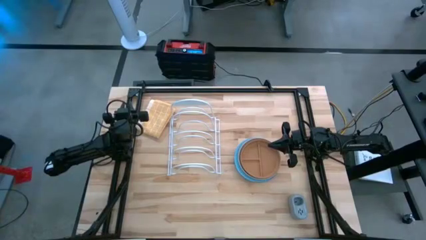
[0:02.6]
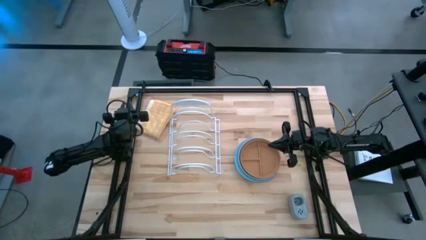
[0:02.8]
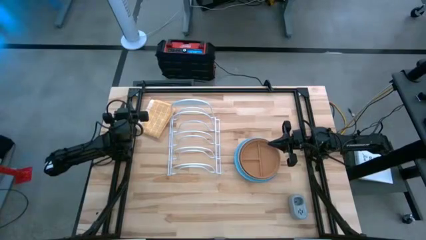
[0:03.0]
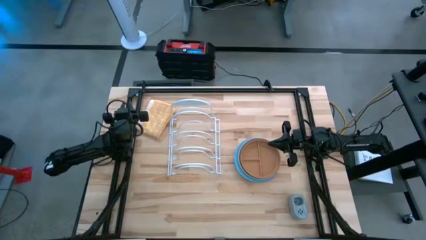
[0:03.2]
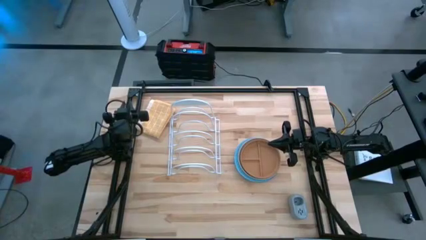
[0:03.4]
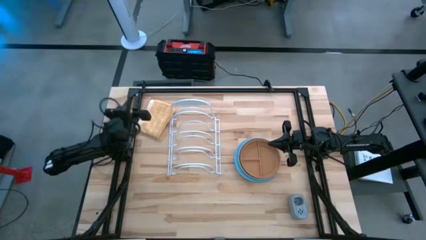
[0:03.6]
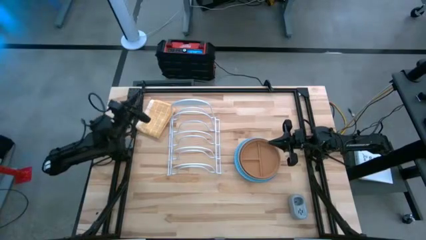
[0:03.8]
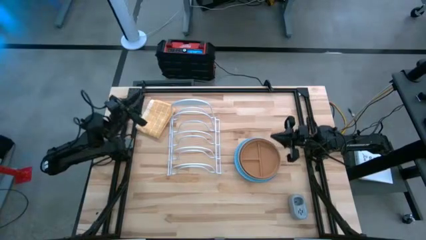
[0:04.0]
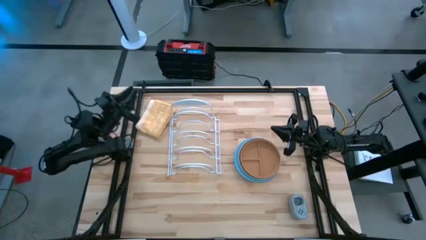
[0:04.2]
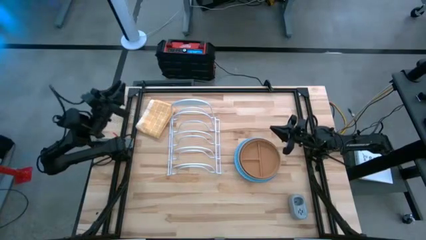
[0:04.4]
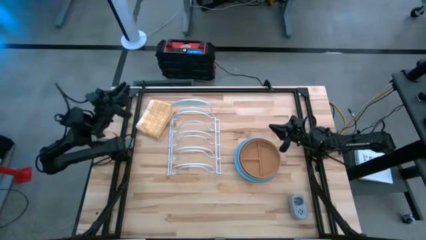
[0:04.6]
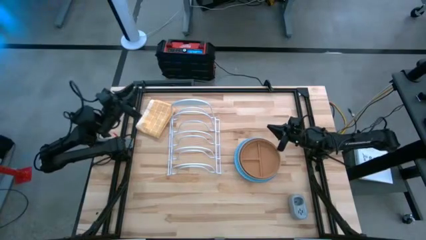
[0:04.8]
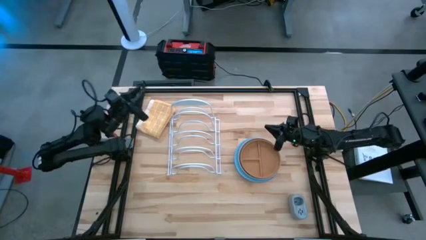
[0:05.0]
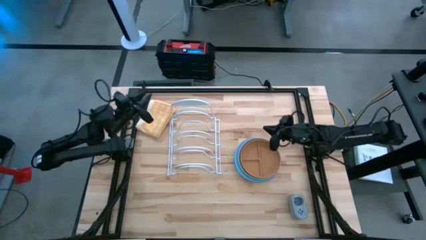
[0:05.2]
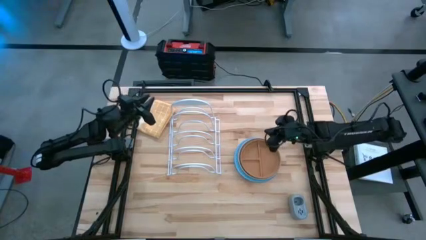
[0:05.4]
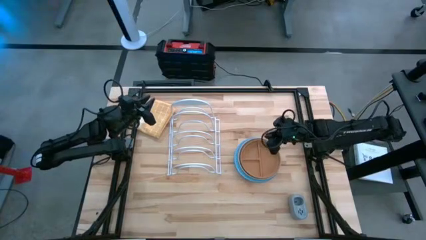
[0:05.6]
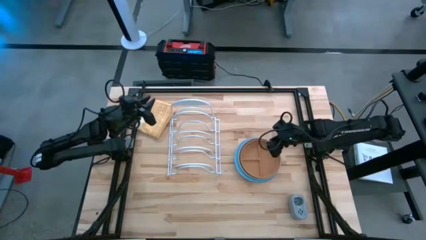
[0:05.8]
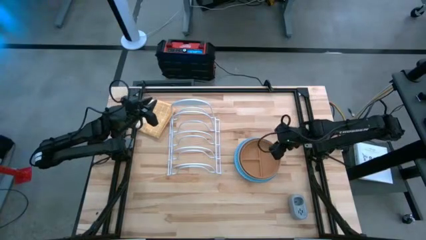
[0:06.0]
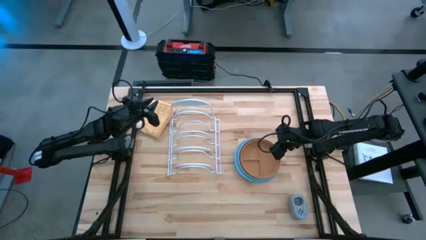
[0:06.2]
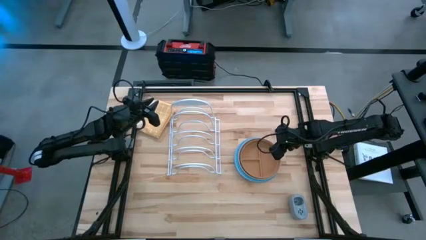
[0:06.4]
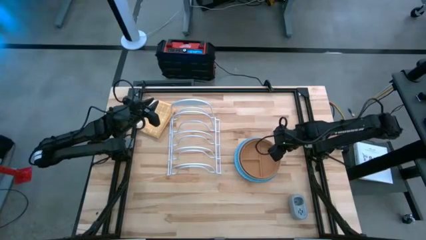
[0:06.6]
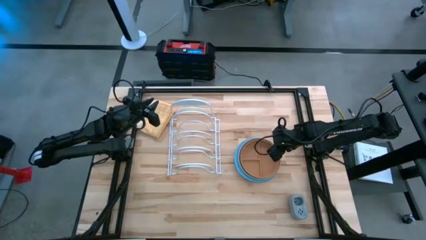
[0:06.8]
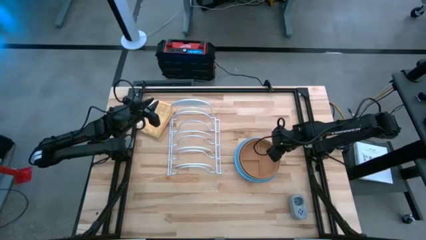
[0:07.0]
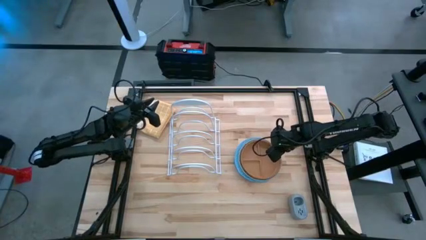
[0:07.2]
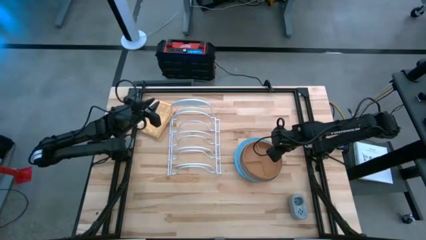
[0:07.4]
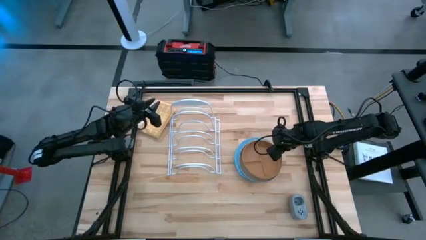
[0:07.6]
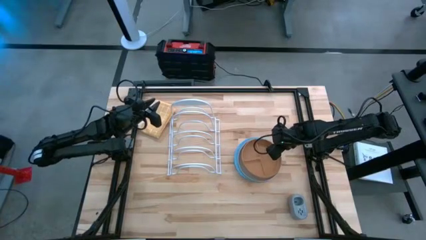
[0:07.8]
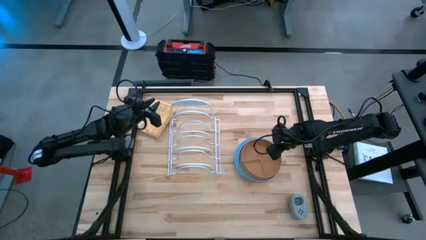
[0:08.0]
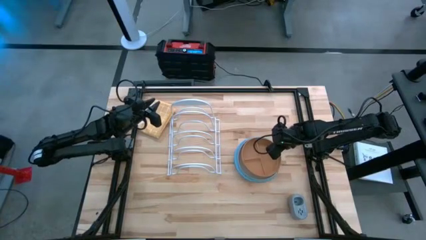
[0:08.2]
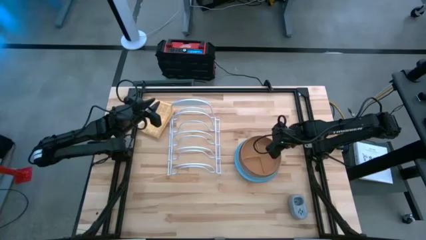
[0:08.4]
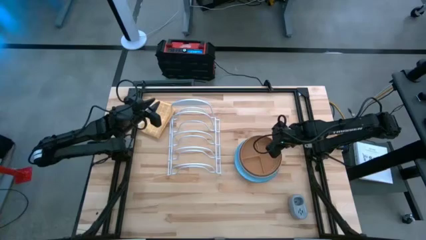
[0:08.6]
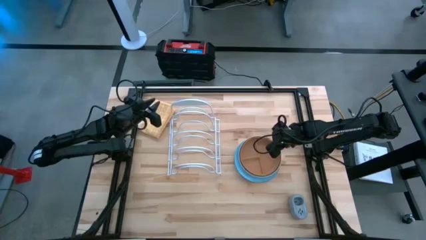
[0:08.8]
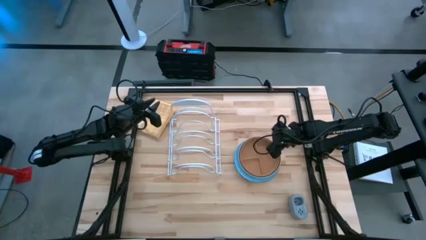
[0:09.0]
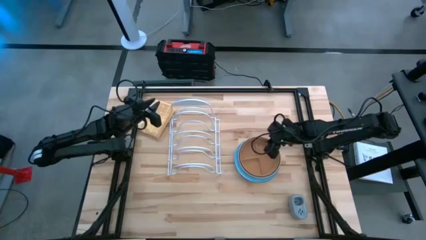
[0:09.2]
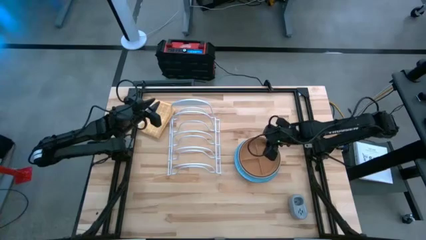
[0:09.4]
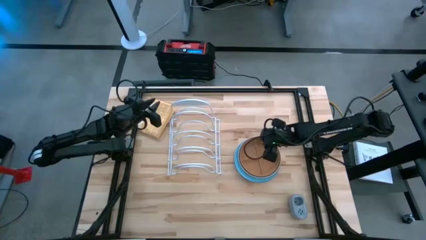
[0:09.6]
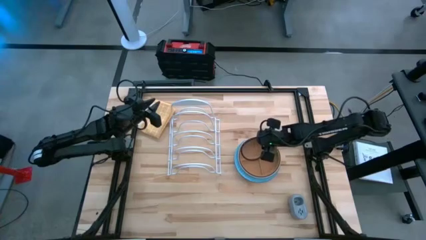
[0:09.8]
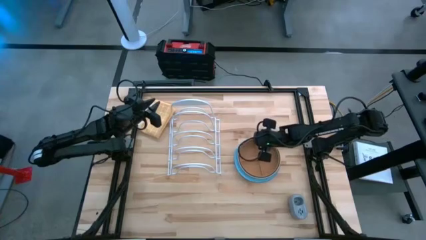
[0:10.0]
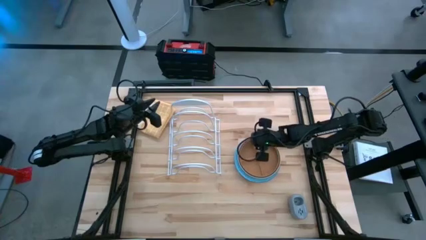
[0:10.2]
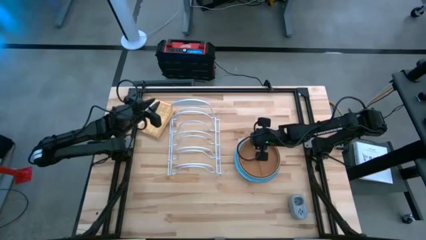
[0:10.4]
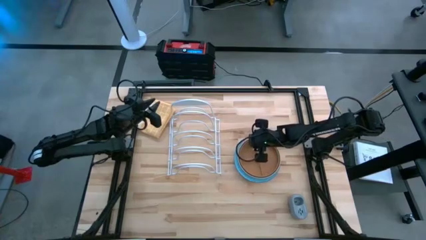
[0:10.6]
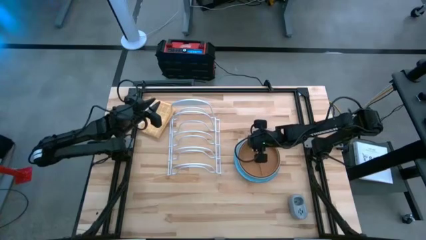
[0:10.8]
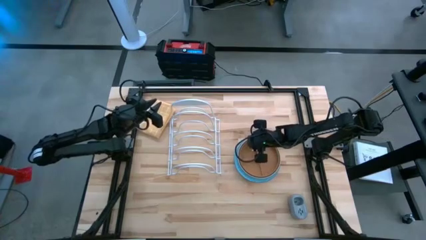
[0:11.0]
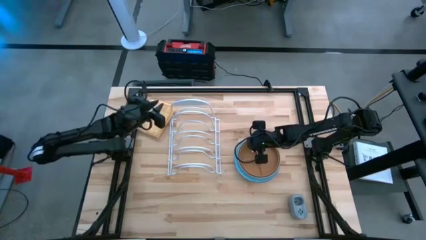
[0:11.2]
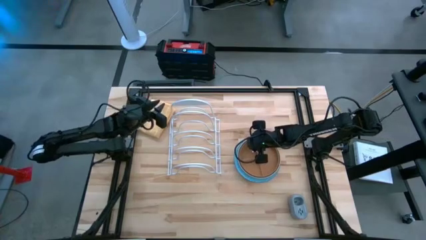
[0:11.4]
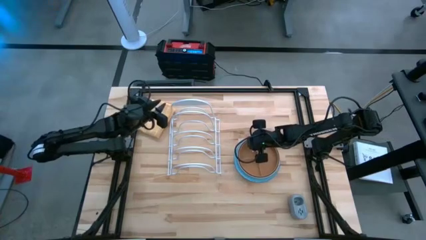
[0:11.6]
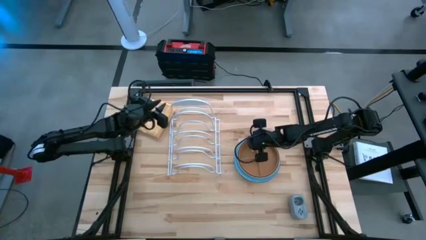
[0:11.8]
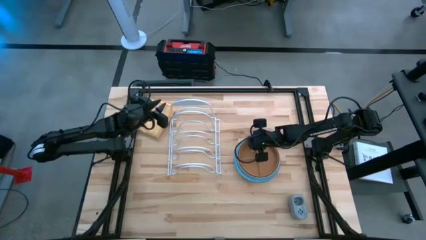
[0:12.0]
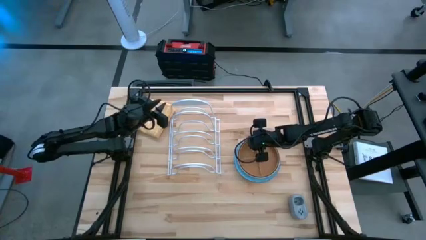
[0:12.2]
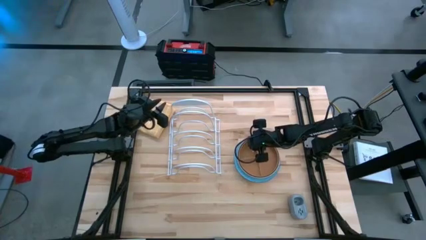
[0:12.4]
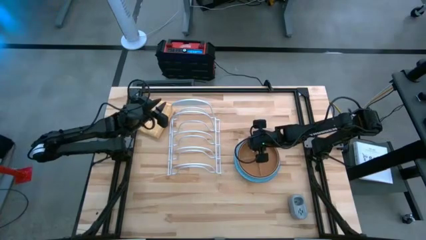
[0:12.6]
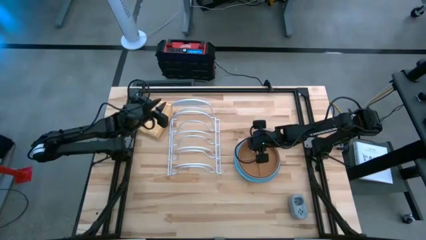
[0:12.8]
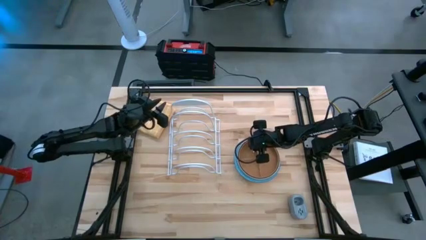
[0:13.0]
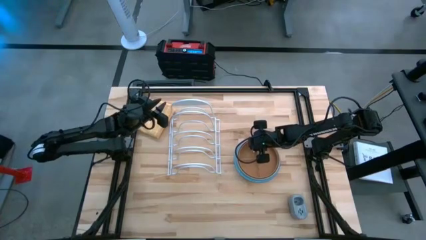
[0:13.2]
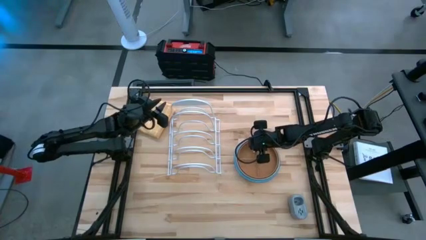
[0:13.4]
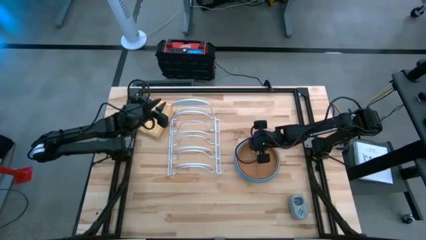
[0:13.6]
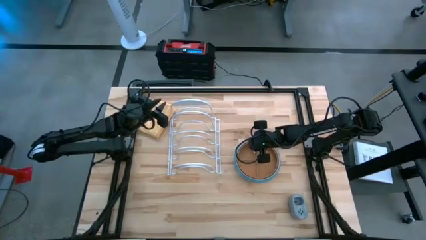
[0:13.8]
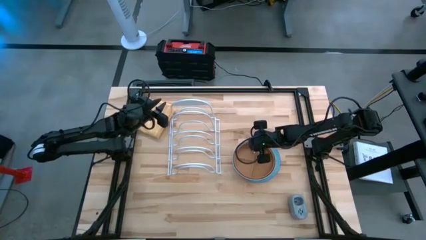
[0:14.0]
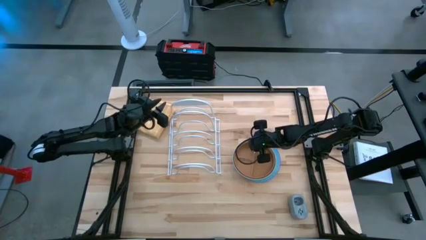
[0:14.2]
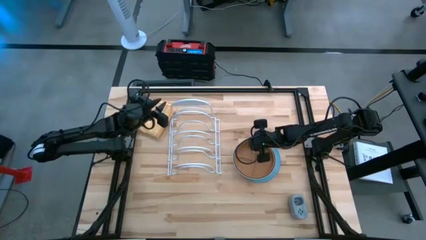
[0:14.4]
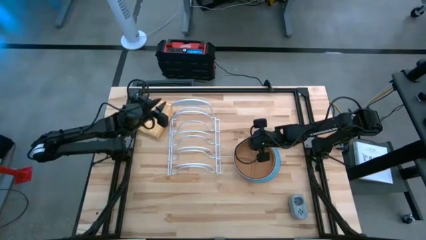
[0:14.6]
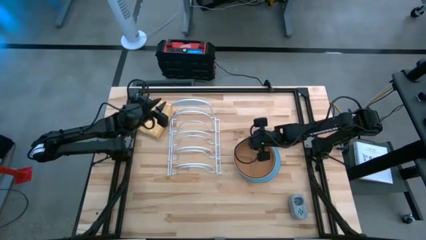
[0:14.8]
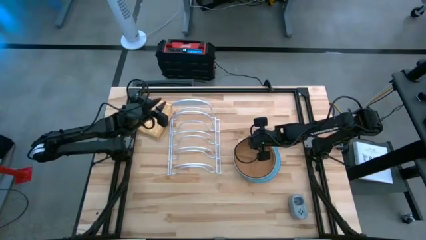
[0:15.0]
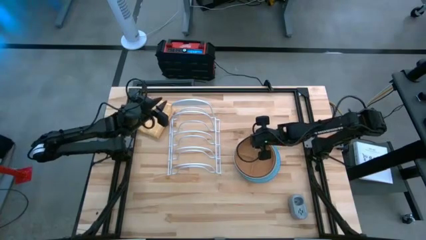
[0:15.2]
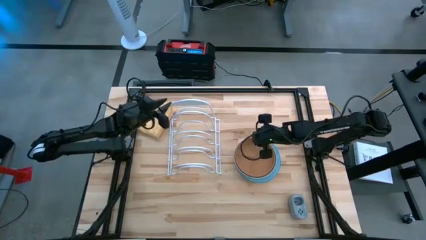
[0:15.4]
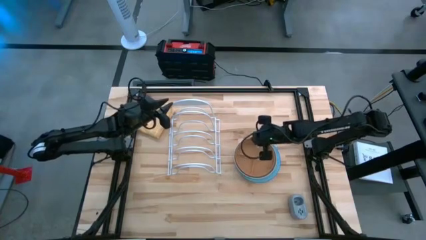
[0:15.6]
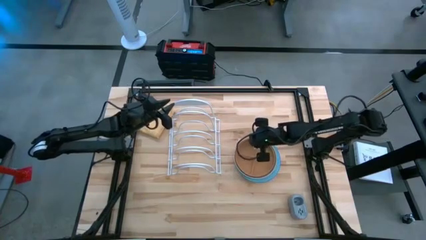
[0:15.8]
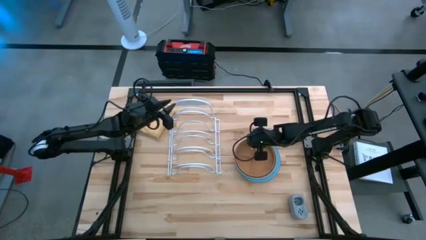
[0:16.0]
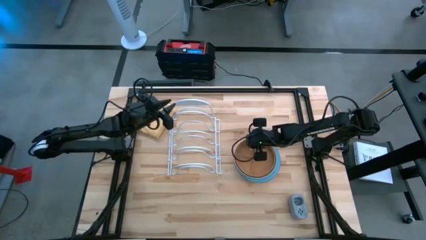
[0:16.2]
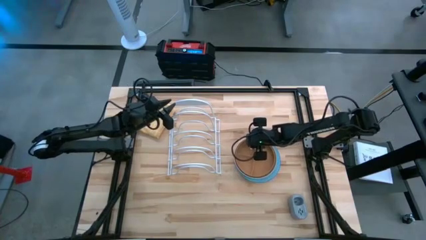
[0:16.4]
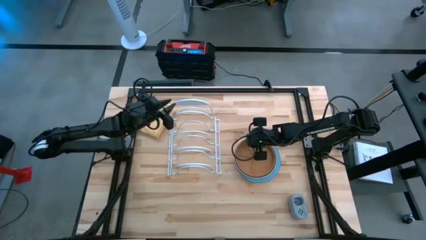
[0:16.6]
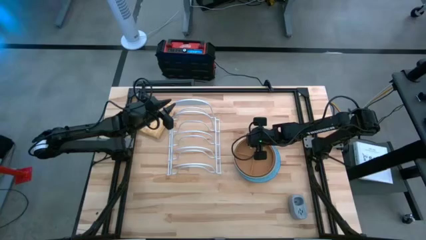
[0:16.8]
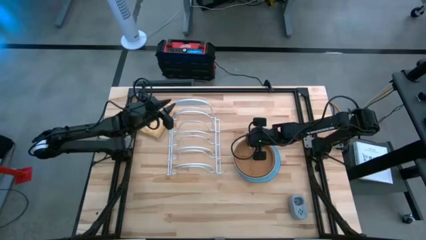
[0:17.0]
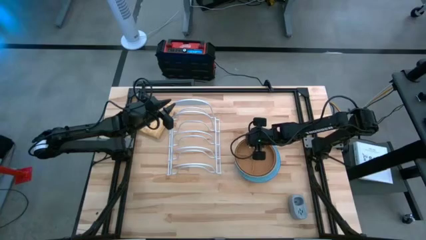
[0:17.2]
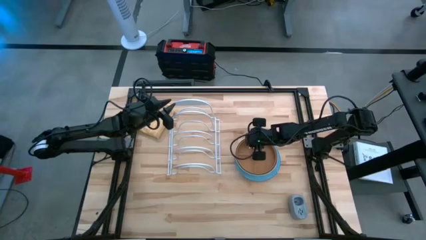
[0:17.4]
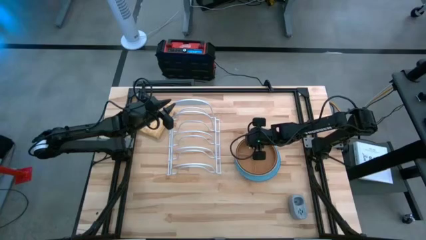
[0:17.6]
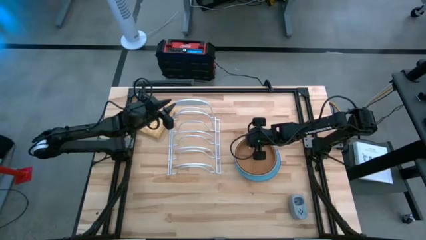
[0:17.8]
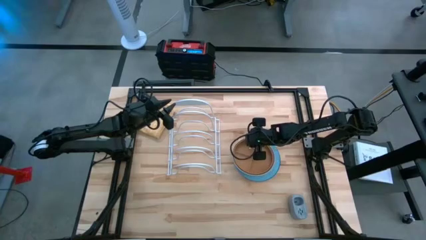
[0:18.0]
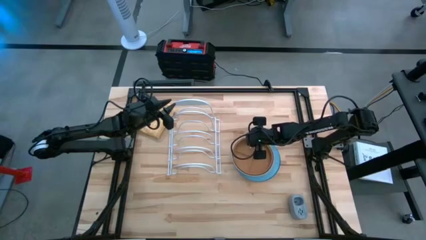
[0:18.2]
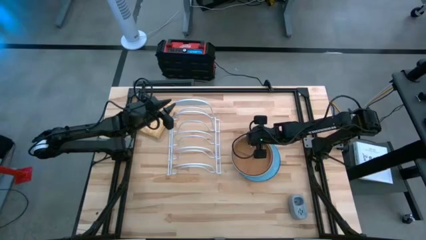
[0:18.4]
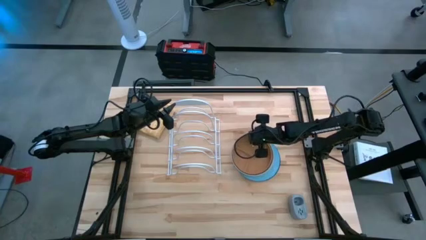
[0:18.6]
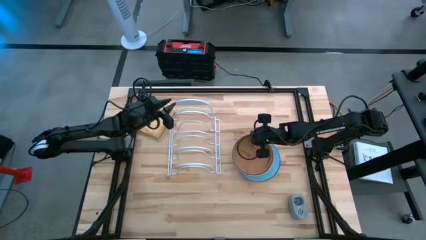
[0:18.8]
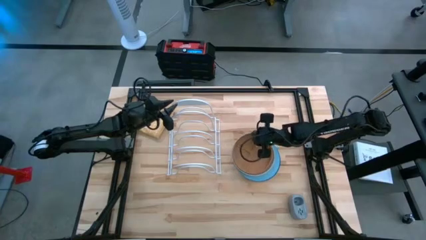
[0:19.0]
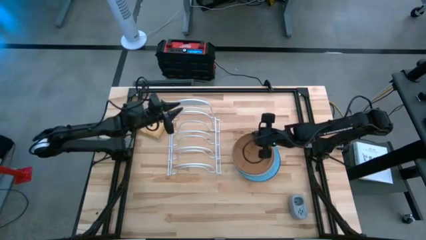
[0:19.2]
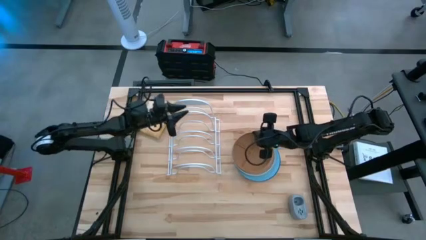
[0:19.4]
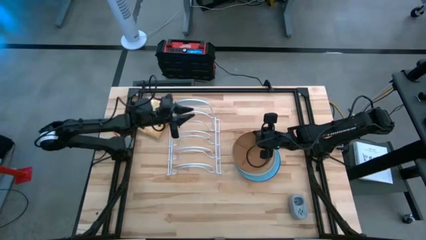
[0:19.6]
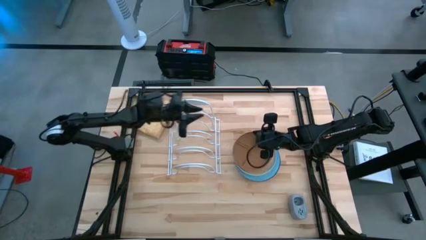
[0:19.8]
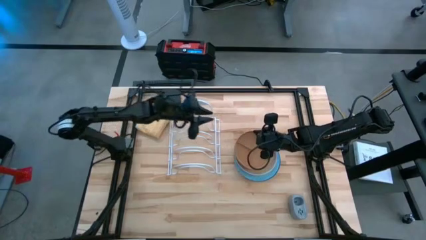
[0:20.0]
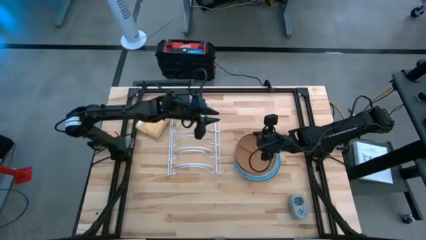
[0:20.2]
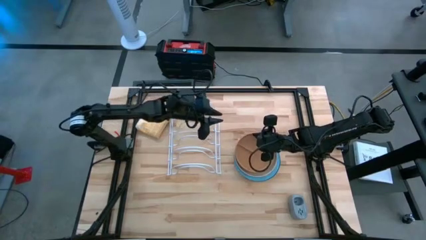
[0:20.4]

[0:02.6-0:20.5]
Task: Sort dishes
Put the brown plate into the dishwasher rack
